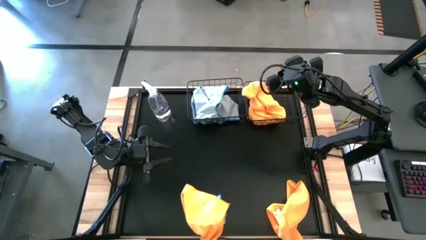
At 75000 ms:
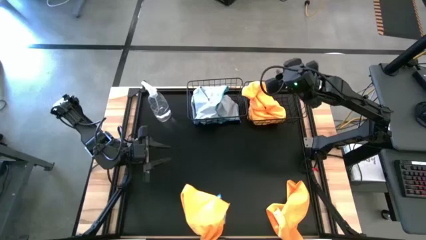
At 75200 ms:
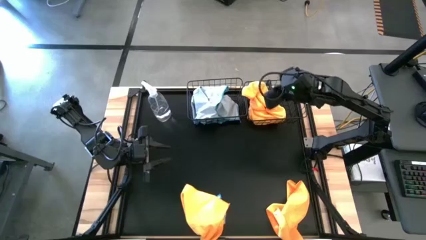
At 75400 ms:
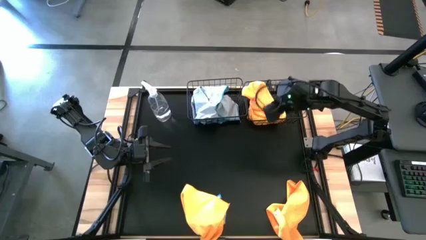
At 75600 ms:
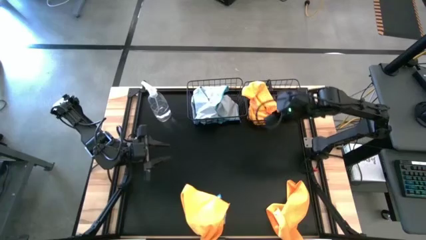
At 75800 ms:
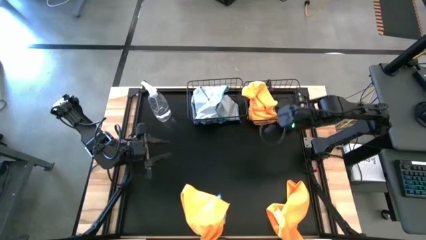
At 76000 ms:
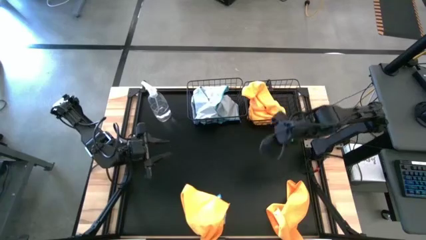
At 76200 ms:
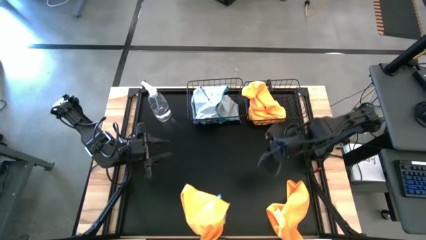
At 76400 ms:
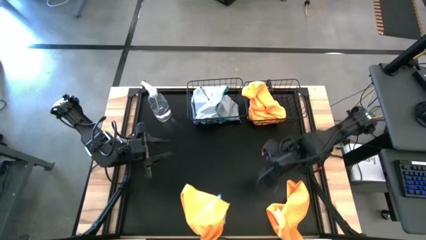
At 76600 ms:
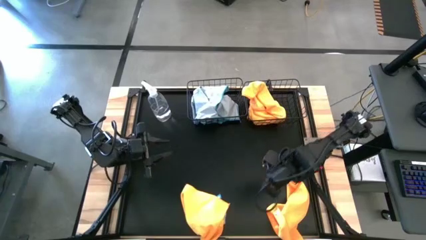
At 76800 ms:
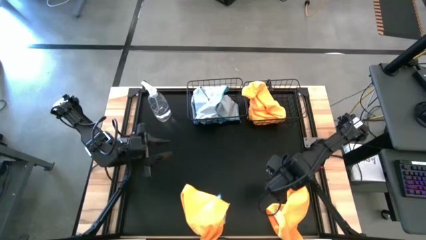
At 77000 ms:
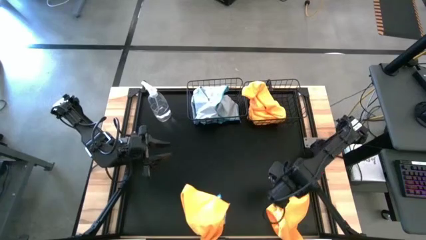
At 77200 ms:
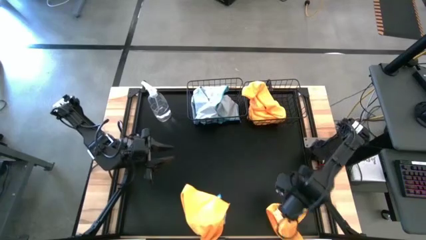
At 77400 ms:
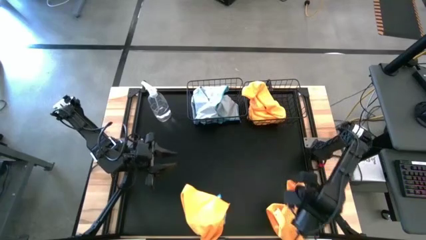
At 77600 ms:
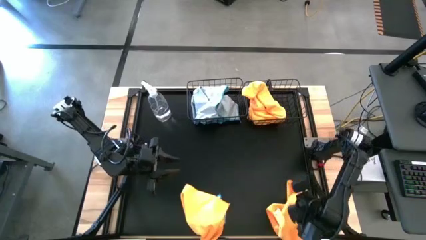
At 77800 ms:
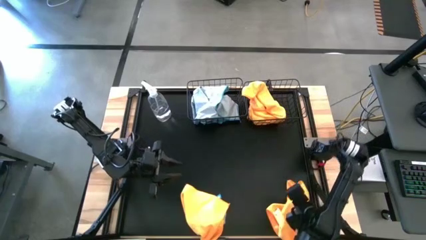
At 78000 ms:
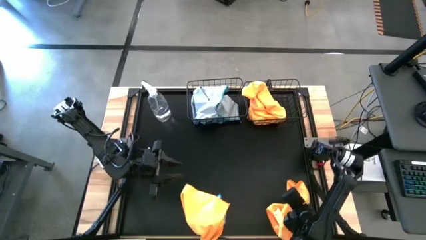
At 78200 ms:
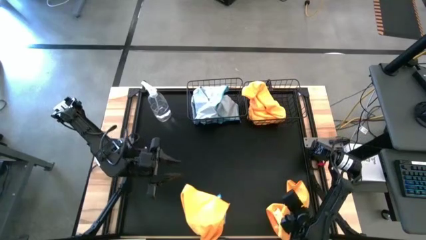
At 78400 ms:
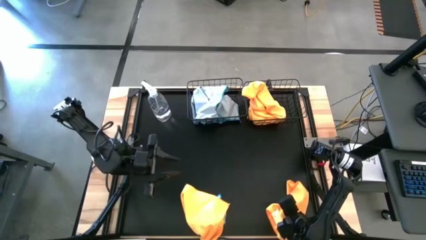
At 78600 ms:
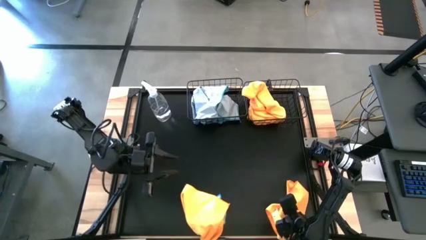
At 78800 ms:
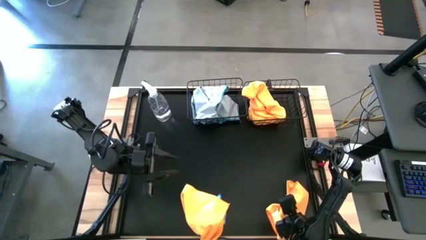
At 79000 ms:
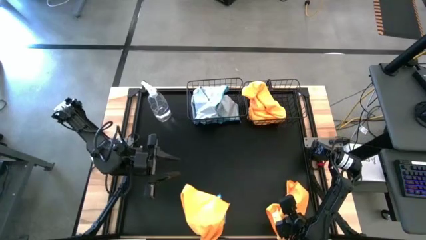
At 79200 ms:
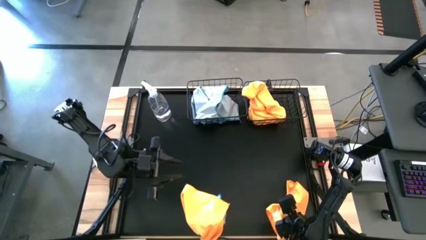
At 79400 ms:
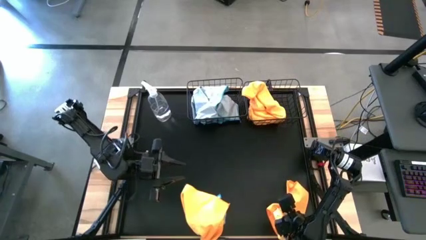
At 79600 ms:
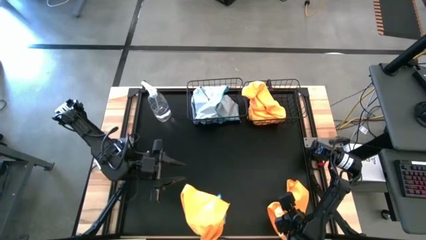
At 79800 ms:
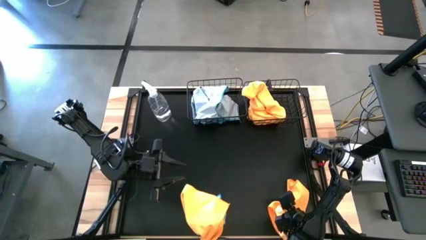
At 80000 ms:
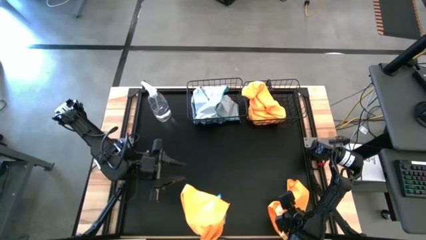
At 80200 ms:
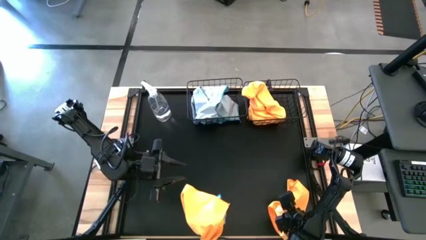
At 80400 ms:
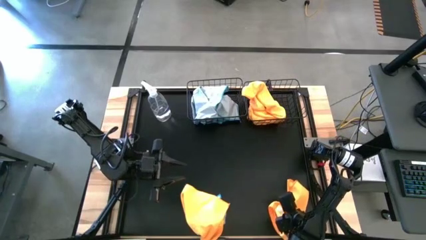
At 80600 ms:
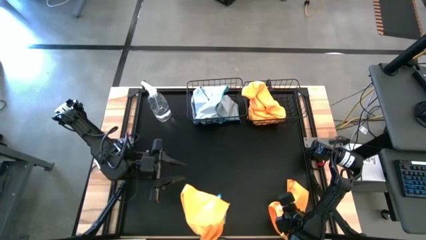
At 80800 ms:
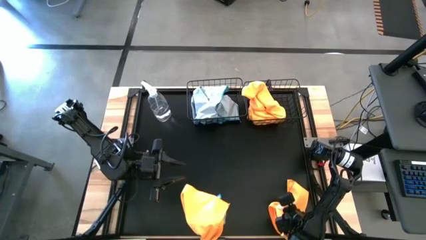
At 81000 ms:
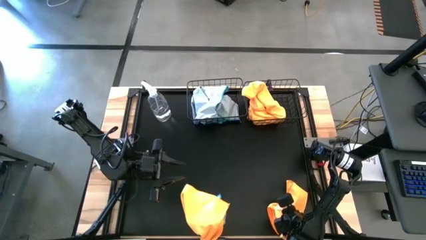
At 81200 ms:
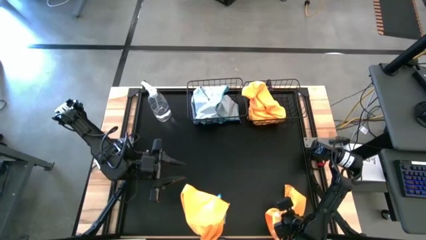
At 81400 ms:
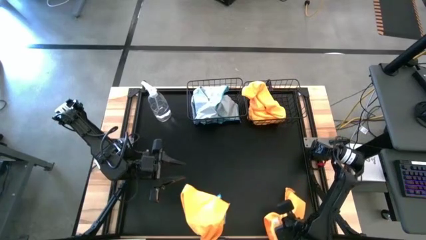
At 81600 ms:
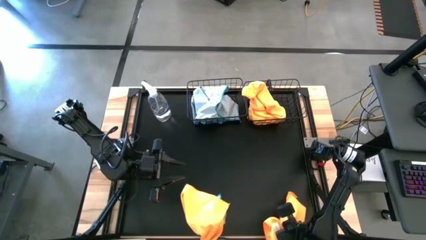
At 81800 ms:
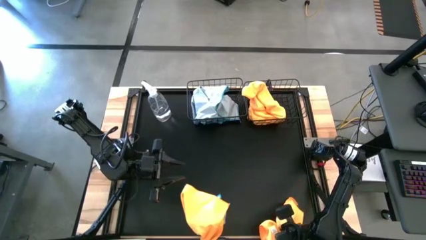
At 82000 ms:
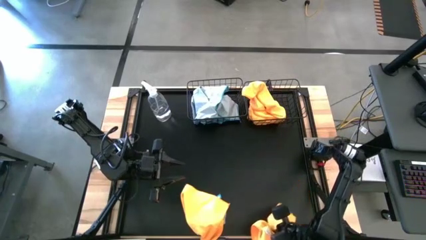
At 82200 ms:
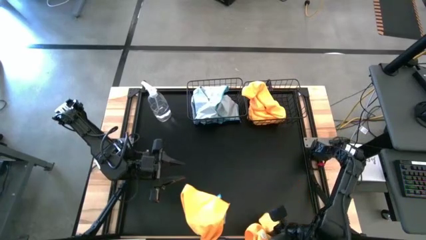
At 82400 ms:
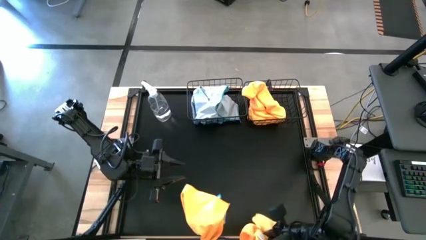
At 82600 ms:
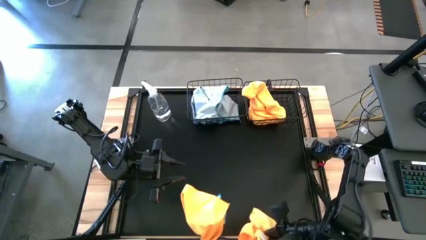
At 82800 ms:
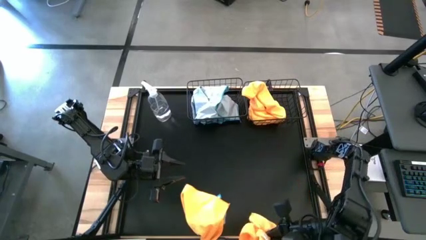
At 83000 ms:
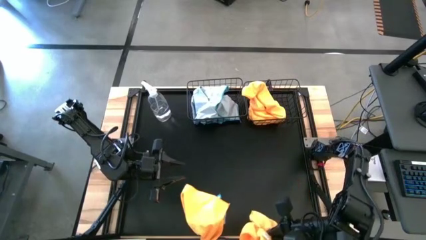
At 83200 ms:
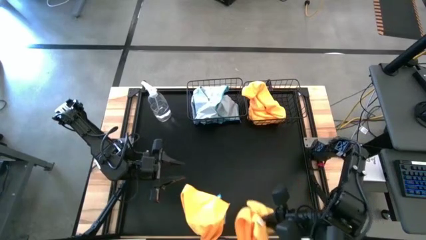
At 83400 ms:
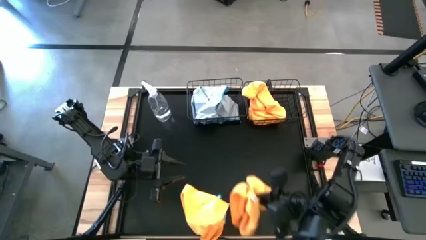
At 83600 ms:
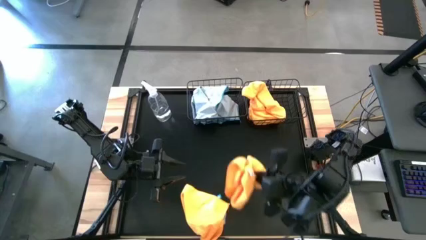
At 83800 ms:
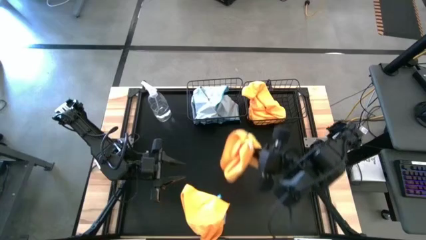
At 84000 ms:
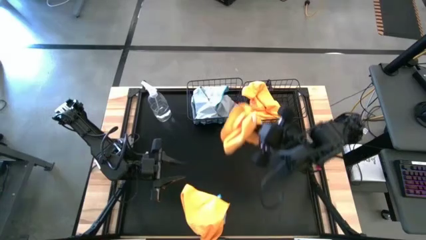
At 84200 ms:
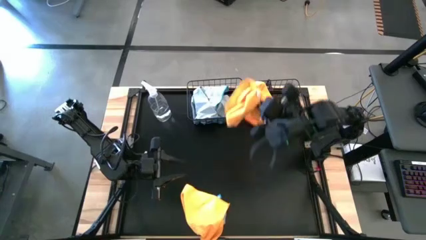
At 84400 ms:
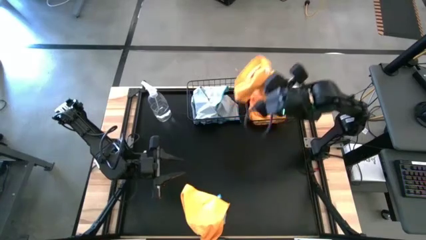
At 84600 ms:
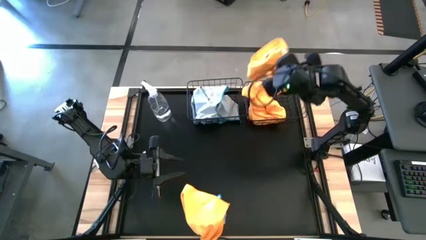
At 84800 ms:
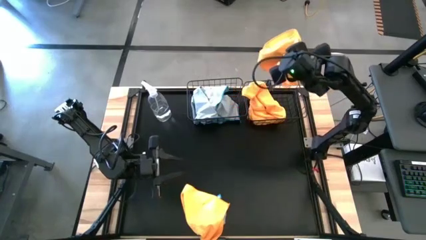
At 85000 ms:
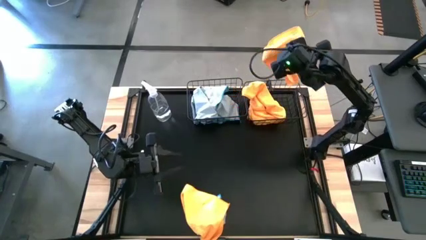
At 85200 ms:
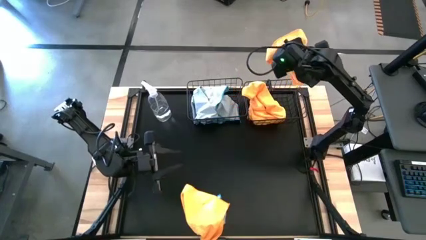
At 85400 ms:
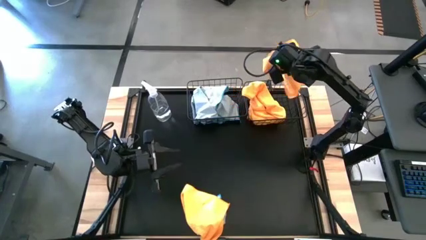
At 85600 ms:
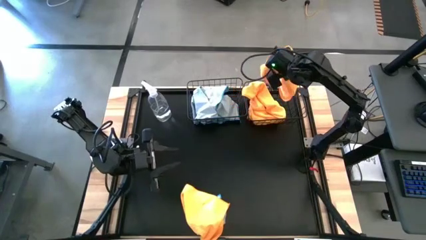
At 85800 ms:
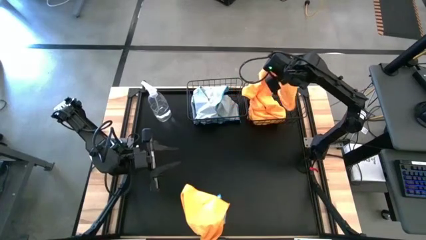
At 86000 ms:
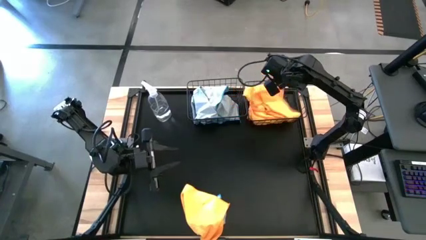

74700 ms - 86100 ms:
Task: Sort microfiber towel by color & place in baskets
Put the right orange microfiber towel into the right black wire basket

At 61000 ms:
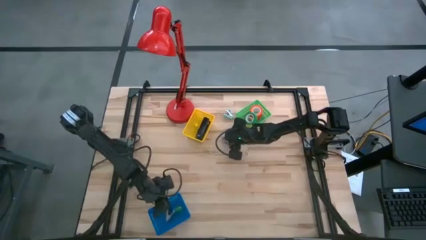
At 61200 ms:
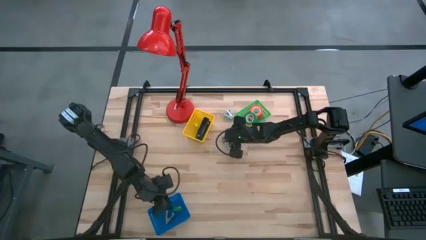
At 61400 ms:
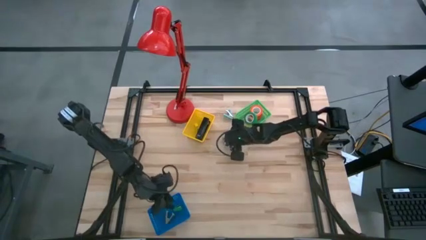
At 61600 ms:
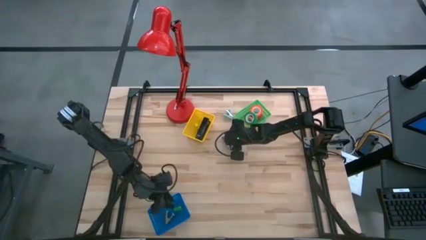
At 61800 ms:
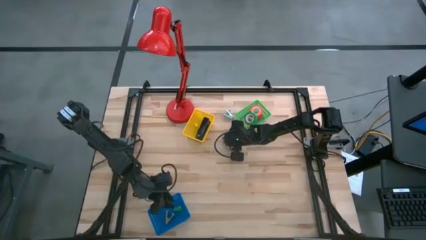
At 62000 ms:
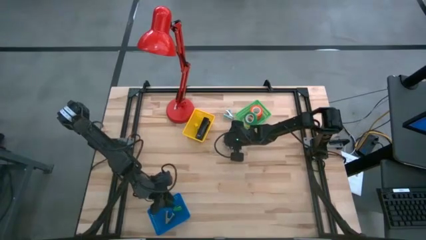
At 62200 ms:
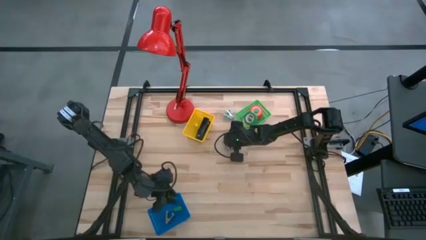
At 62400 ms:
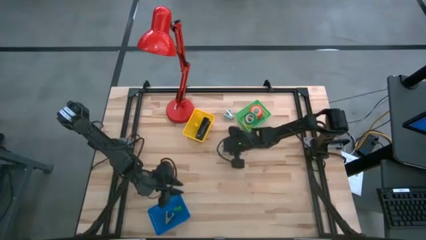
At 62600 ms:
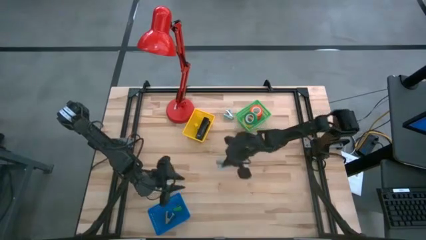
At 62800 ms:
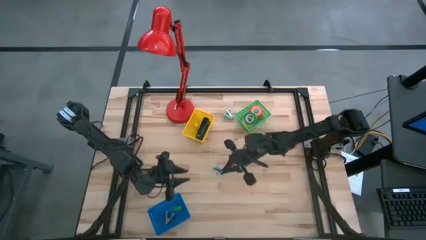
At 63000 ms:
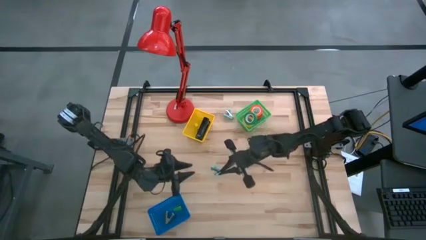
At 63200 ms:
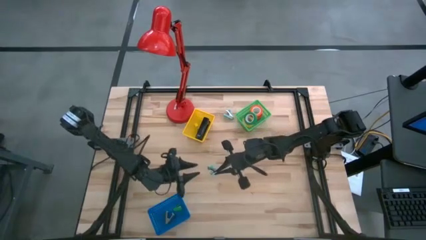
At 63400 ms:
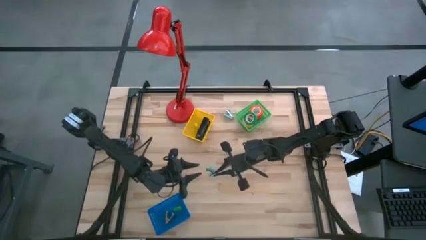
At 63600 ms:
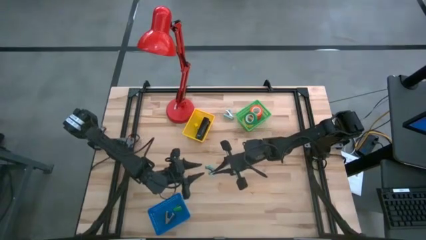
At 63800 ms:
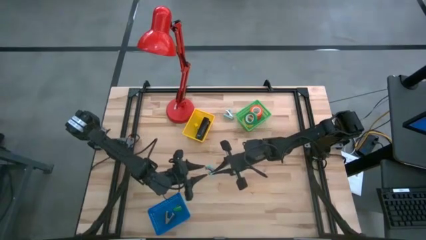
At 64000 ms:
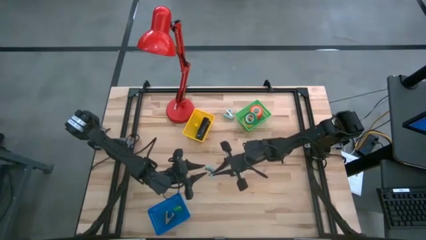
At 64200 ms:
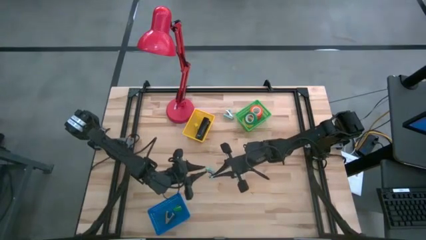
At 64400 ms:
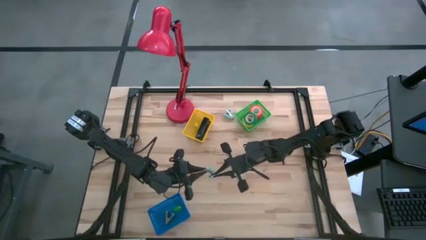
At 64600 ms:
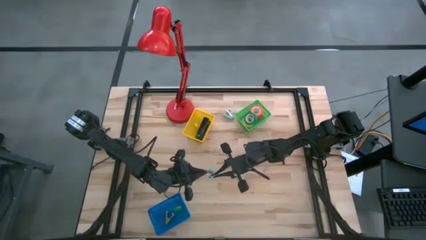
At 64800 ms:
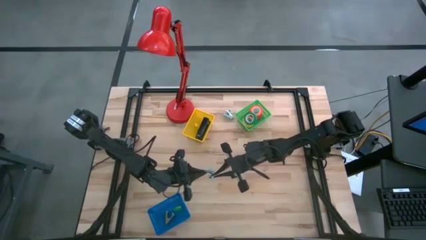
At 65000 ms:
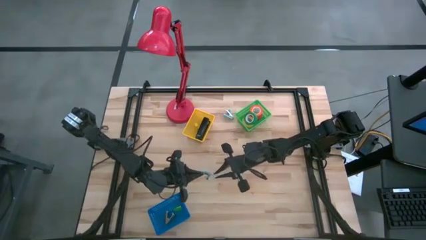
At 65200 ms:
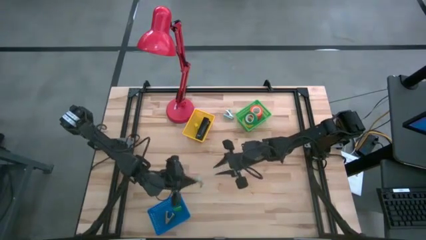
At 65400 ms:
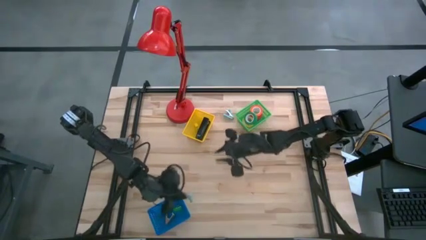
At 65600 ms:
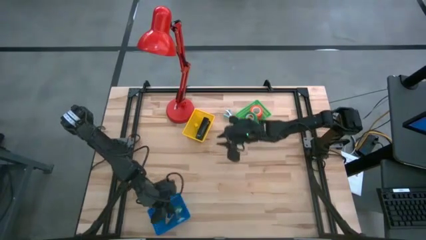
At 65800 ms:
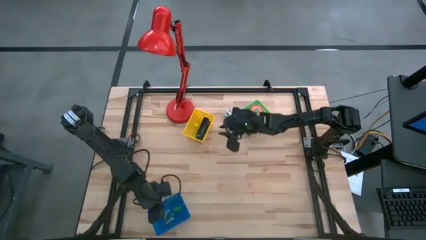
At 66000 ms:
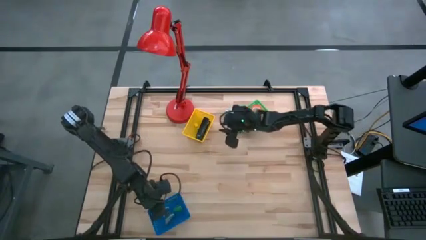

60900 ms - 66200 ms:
Task: Pick and place Stapler, Stapler remover, tape
Put the bottom blue staple remover into the blue bin
